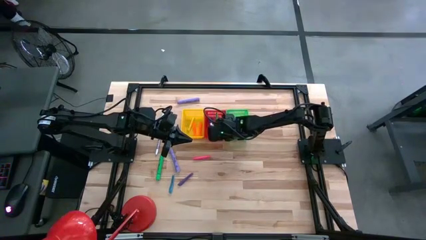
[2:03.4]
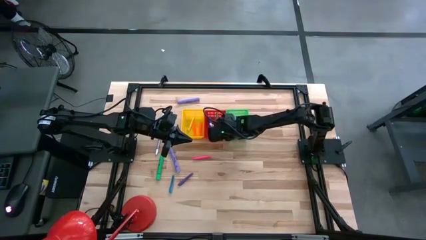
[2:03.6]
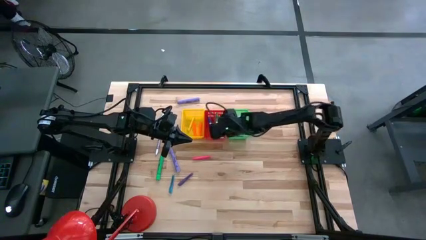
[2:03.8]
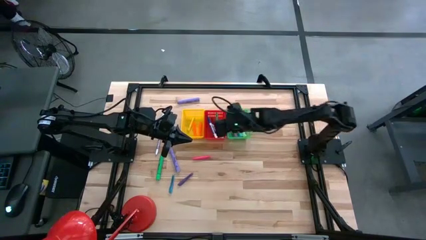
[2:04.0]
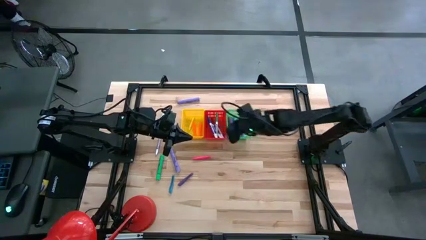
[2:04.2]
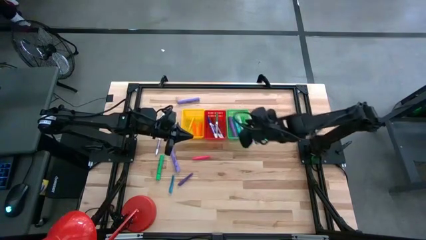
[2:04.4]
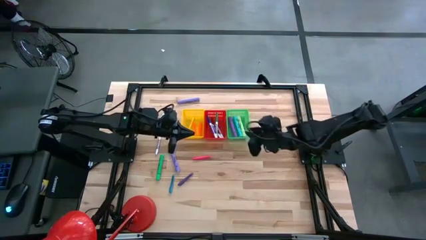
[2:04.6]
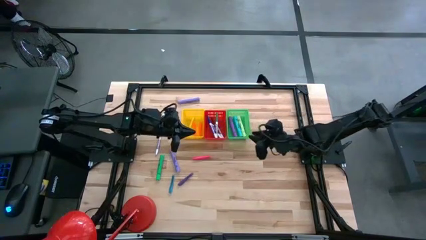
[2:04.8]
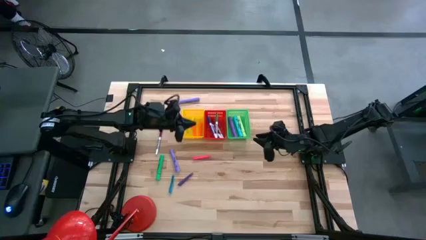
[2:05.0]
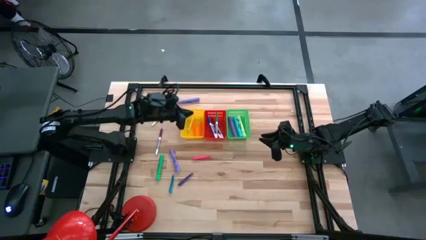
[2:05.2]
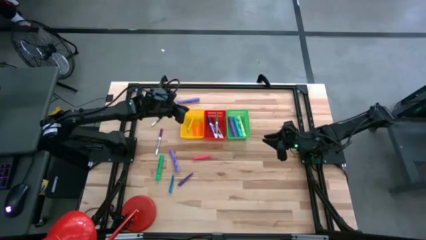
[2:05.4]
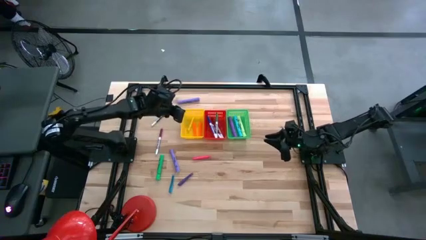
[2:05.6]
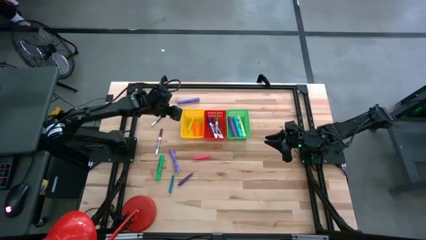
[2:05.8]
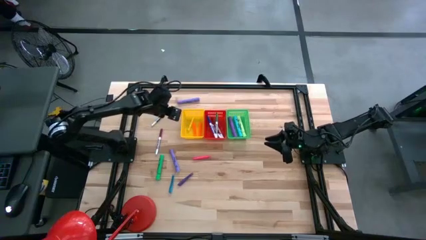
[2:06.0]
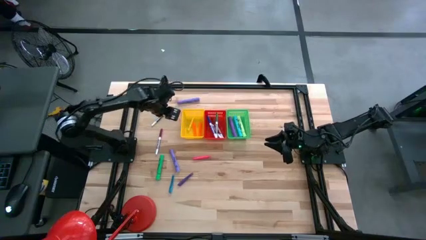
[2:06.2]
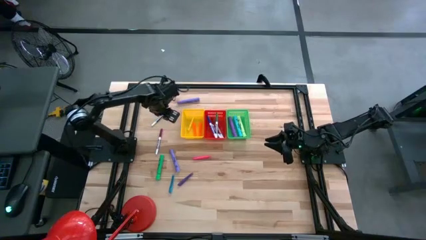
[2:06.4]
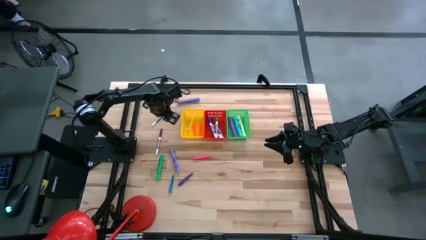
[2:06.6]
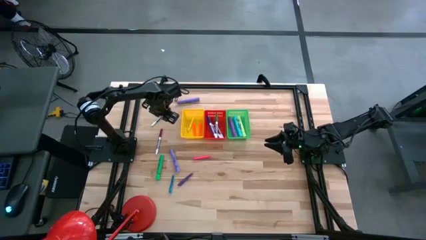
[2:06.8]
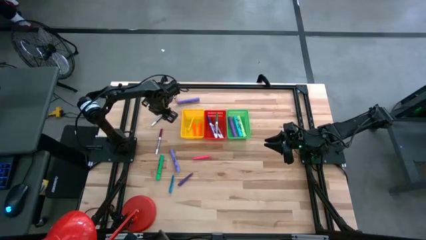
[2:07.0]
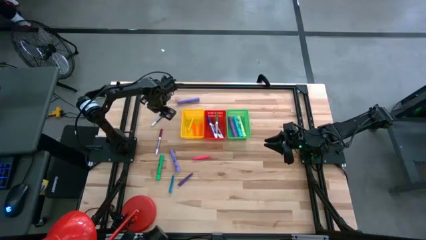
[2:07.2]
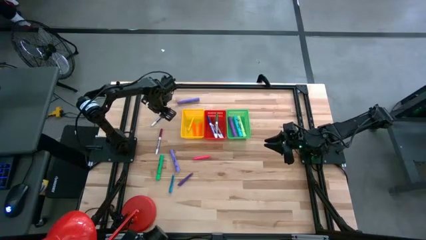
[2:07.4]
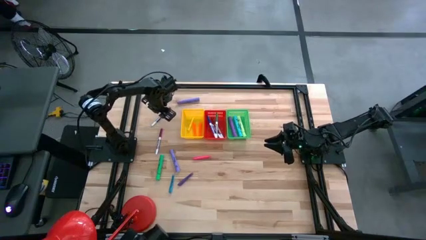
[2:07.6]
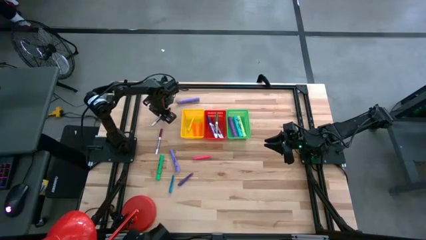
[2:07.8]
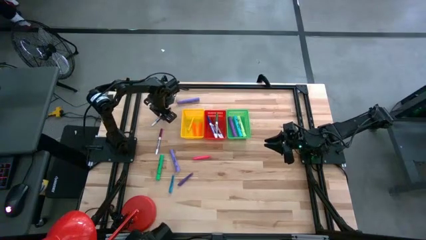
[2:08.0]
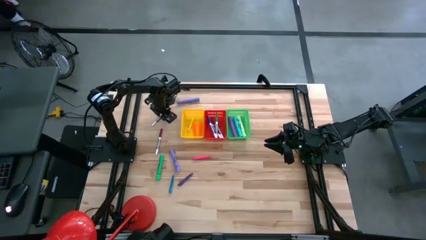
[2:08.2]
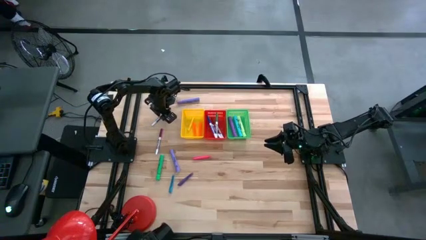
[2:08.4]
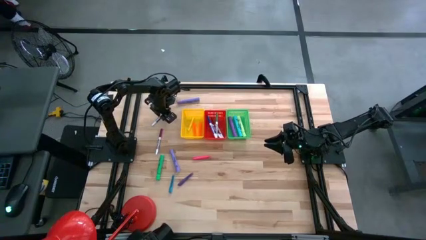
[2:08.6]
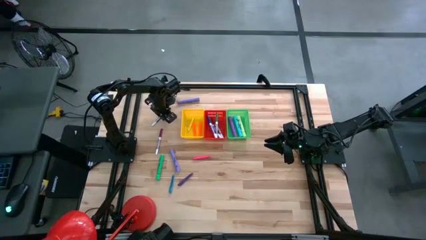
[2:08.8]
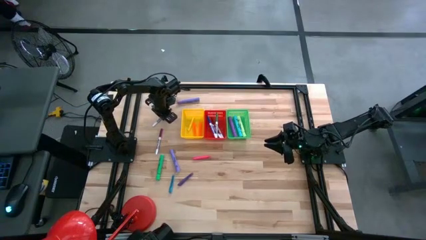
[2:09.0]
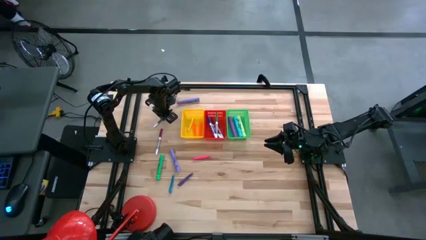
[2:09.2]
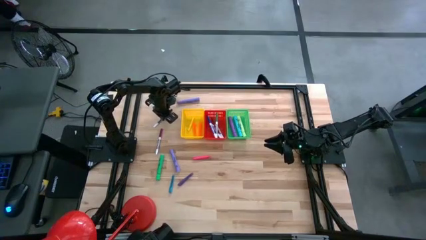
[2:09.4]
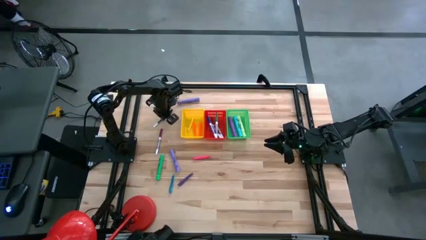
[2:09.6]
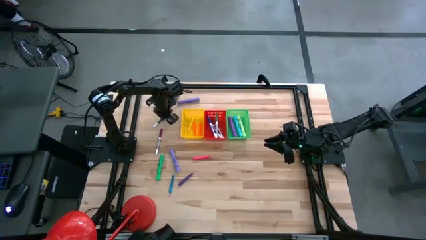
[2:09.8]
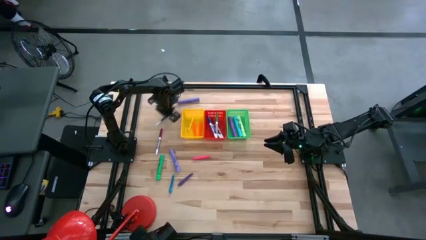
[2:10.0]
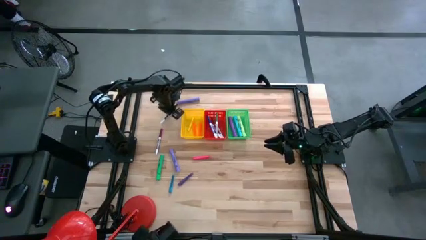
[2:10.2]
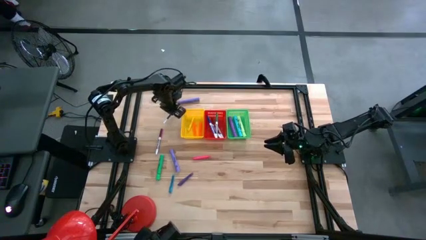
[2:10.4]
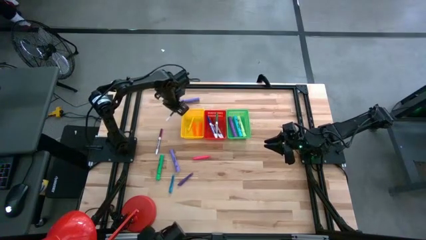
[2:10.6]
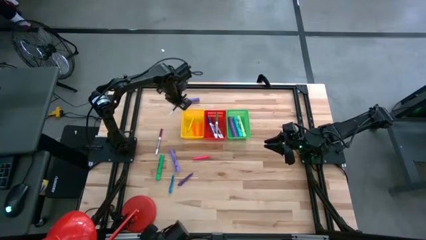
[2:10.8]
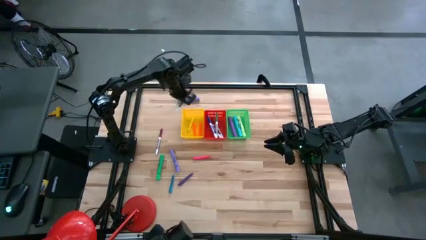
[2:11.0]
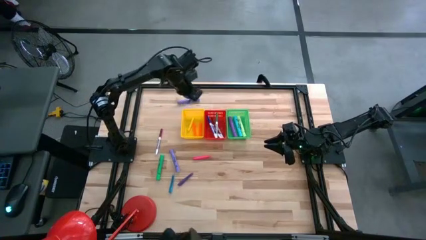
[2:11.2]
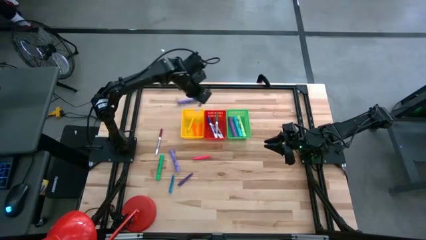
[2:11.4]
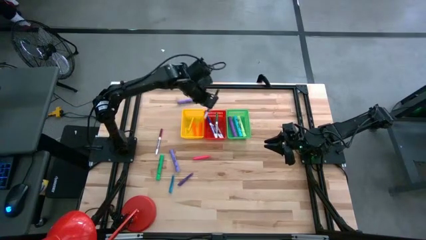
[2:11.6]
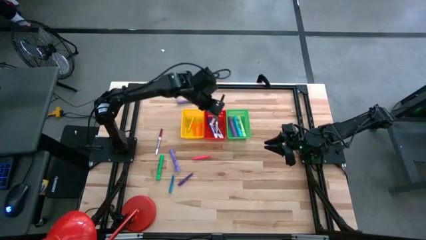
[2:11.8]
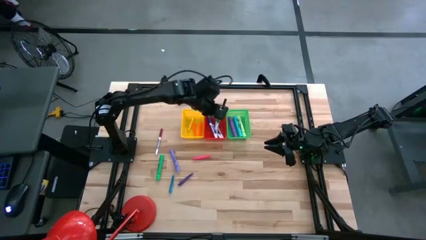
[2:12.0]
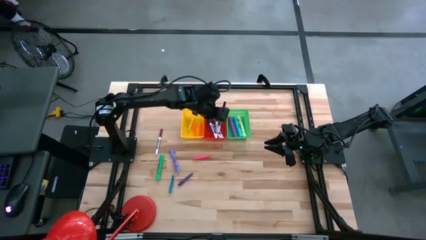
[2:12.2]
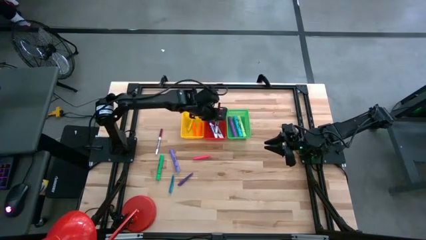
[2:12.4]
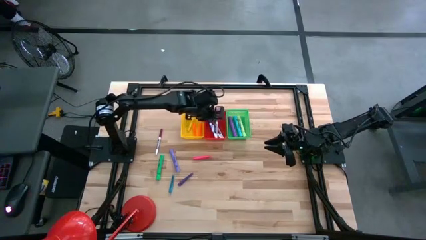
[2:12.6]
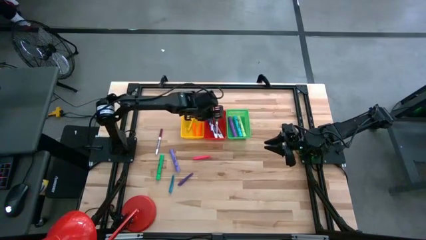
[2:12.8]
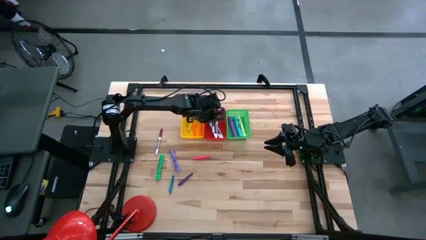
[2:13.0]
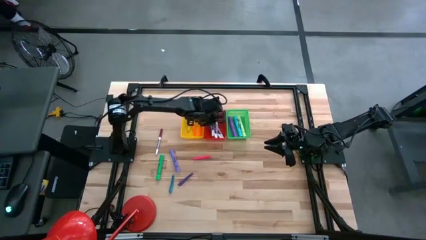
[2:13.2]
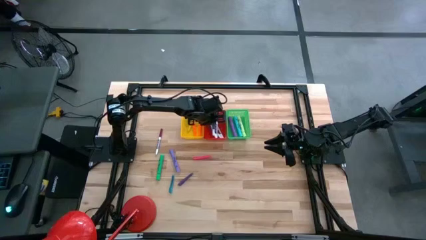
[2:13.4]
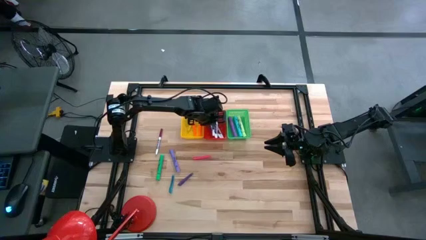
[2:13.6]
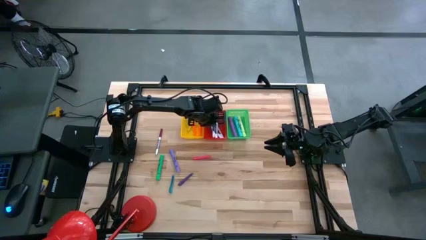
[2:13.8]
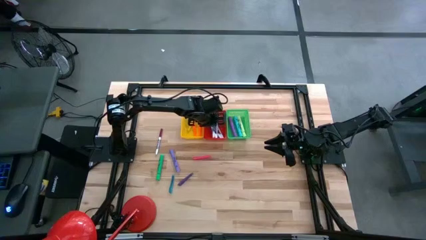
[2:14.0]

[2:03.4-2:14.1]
Task: Pick & Place Markers
Put the black marker into the red bin

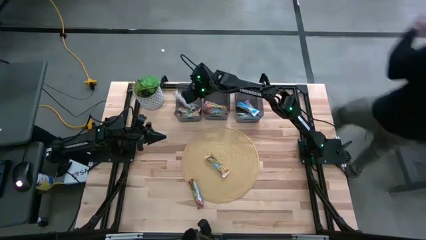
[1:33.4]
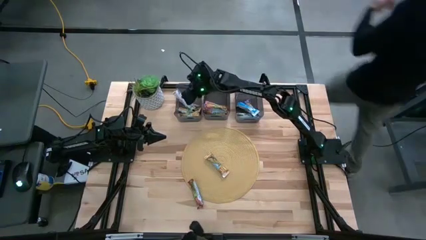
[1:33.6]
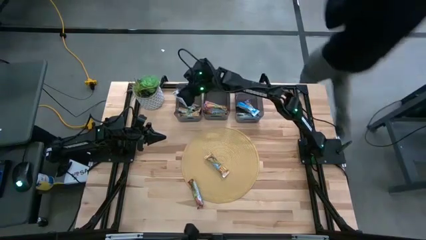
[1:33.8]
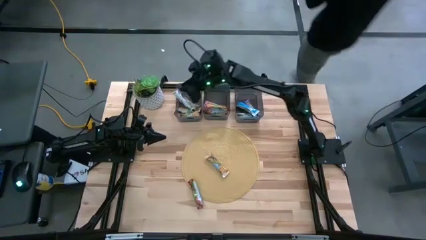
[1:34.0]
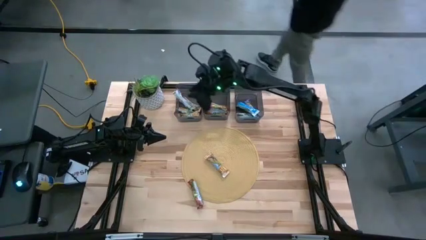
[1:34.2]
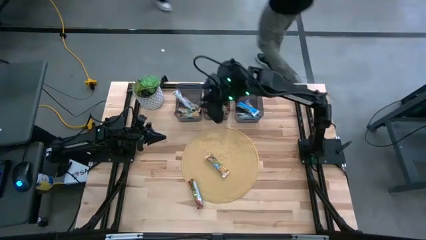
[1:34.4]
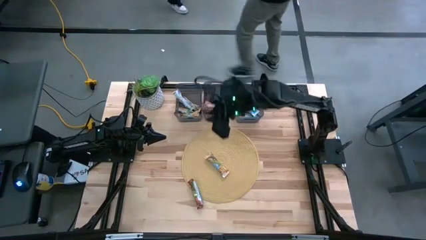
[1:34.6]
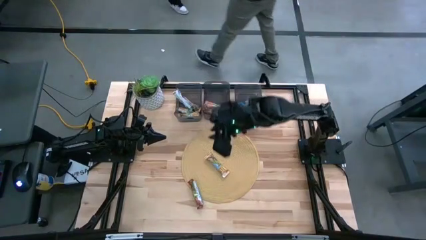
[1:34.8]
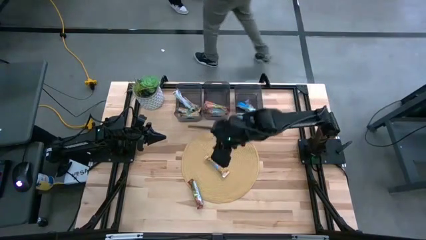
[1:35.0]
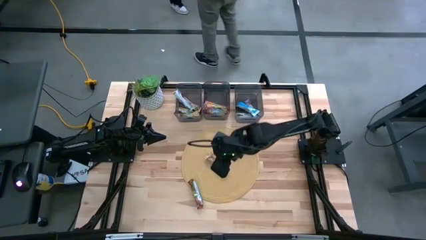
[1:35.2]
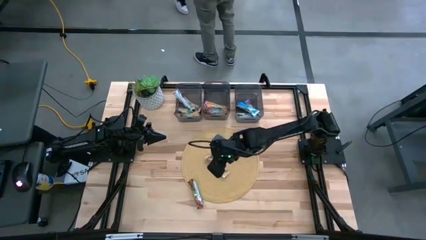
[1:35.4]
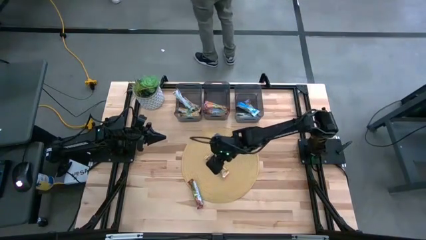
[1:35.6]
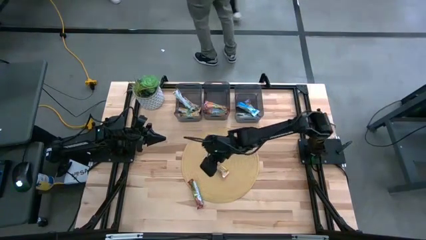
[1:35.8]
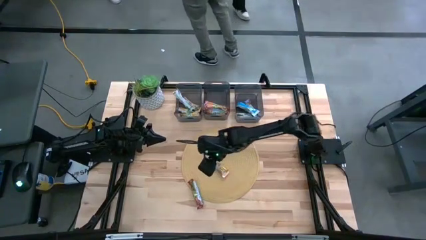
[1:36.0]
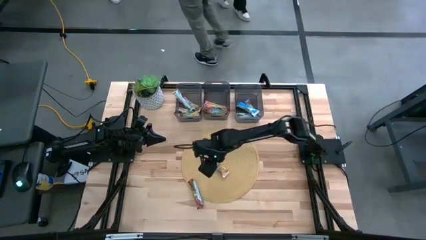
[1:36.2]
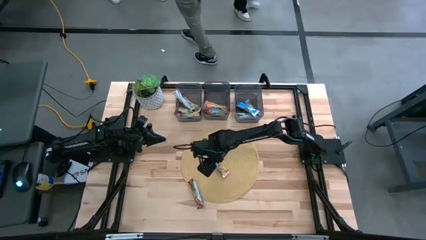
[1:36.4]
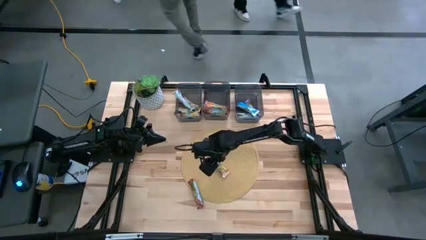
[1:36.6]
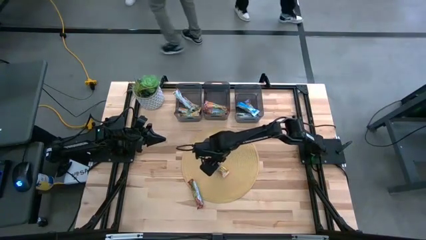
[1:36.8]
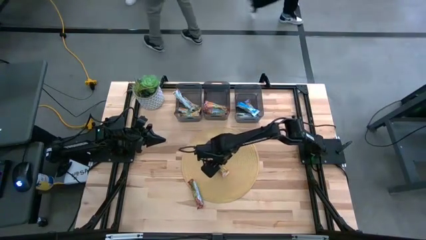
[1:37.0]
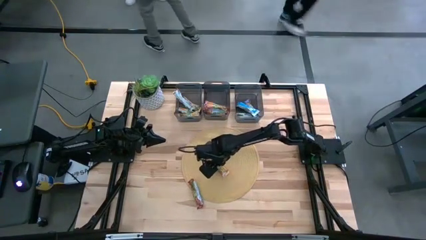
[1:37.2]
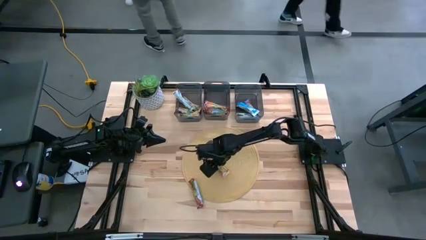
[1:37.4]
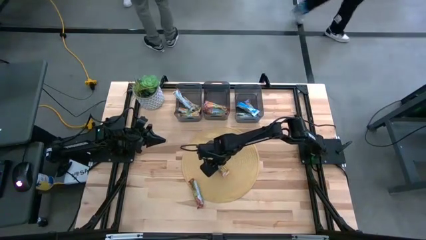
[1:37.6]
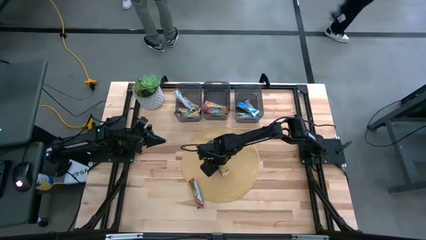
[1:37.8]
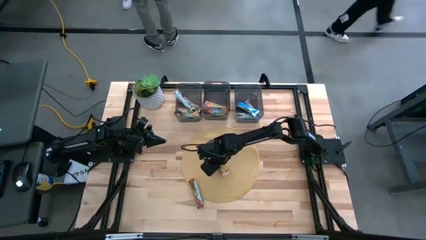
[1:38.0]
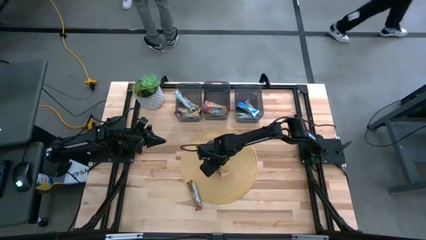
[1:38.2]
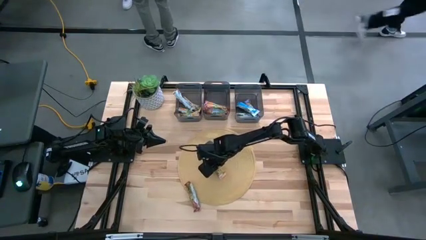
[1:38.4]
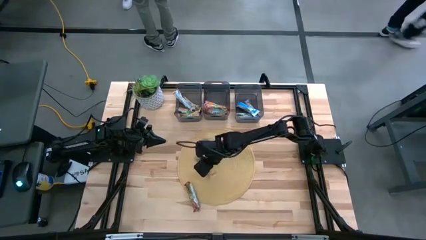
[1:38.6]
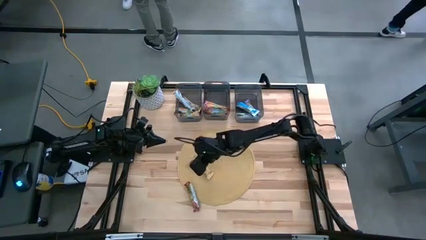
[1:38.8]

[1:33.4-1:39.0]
Task: Pick and place Granola Bars by type
Put the yellow granola bar into the left black bin
